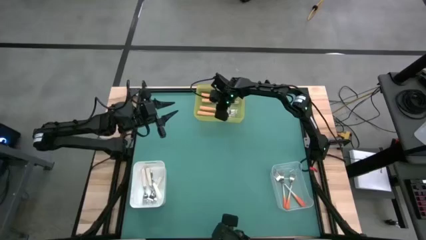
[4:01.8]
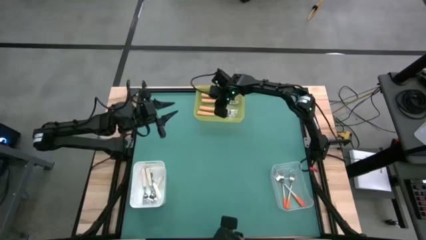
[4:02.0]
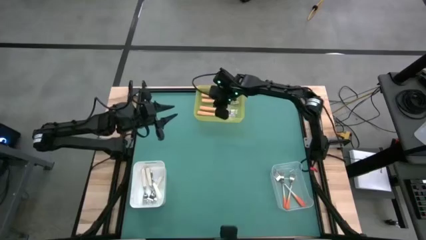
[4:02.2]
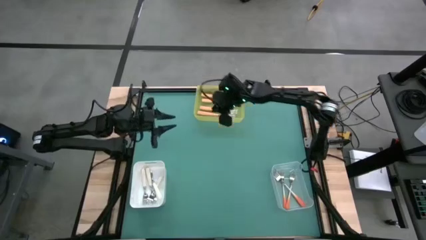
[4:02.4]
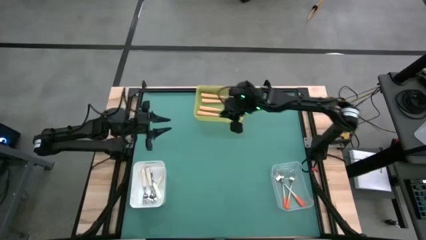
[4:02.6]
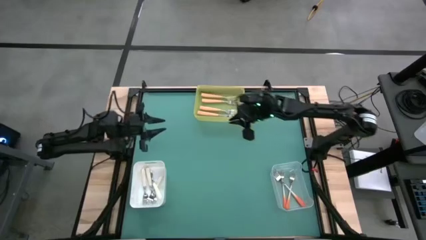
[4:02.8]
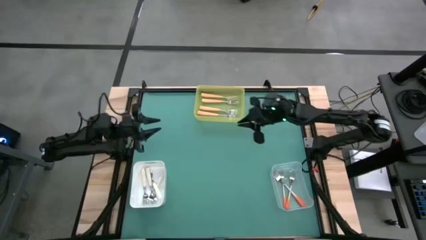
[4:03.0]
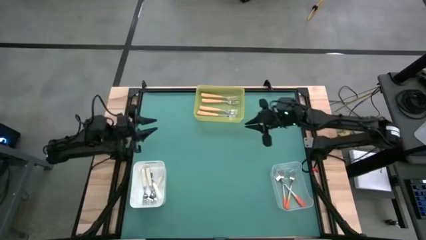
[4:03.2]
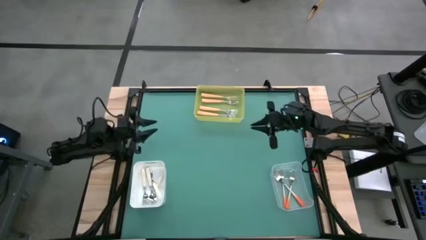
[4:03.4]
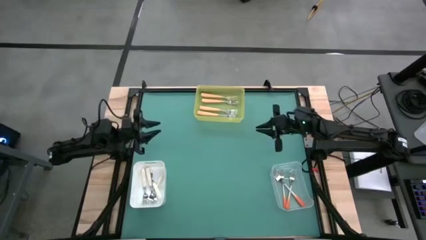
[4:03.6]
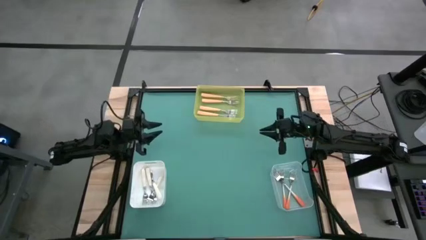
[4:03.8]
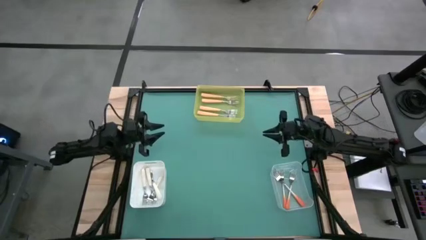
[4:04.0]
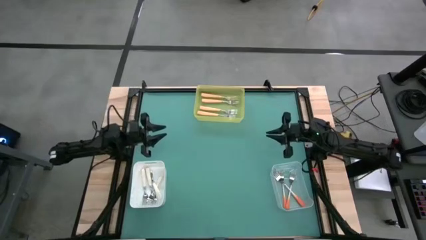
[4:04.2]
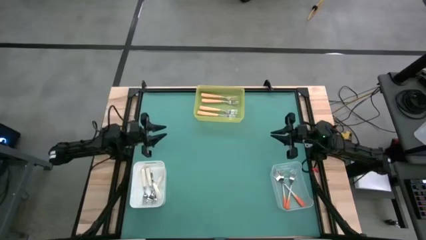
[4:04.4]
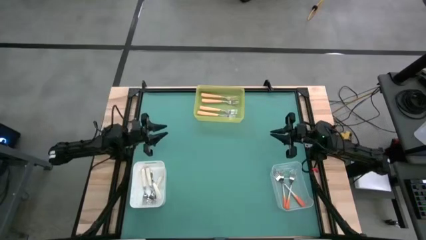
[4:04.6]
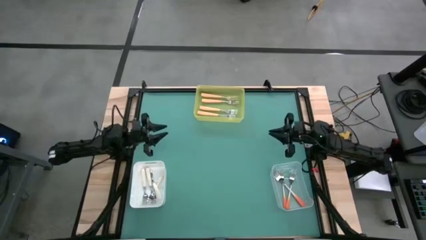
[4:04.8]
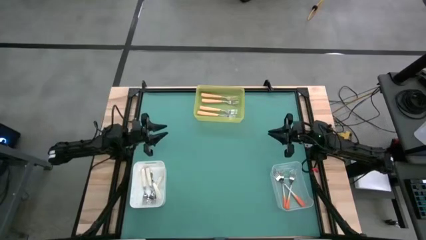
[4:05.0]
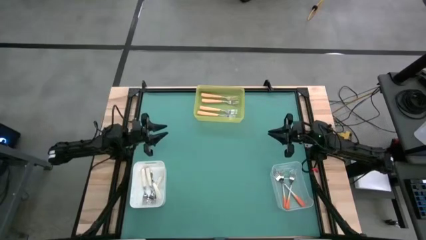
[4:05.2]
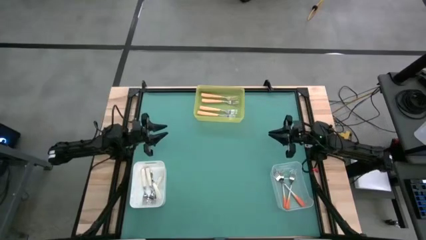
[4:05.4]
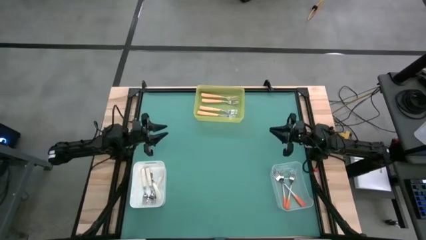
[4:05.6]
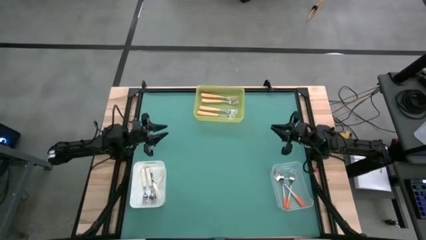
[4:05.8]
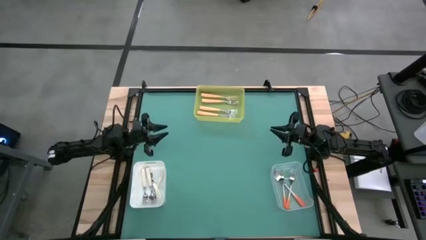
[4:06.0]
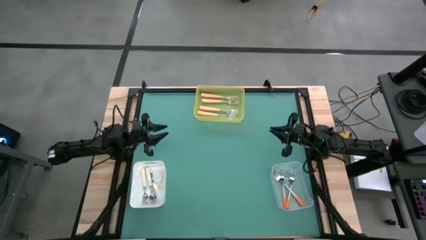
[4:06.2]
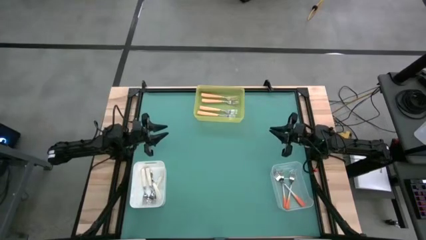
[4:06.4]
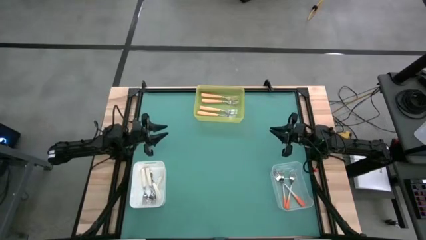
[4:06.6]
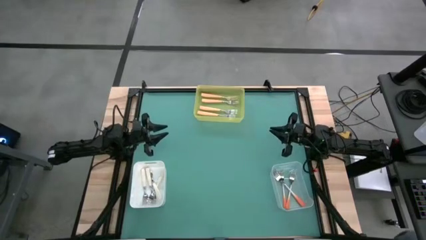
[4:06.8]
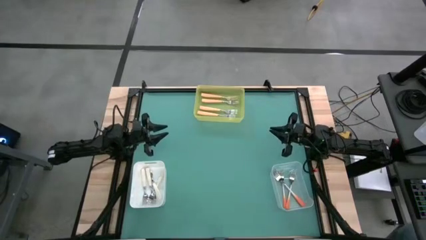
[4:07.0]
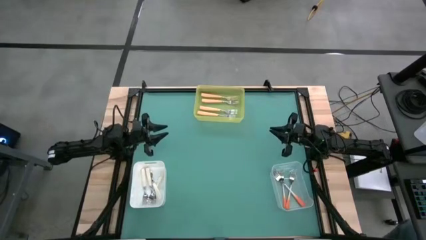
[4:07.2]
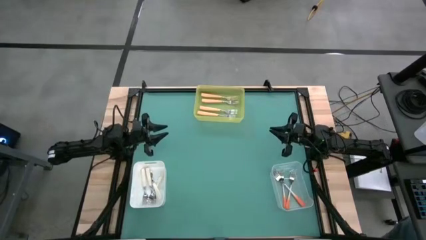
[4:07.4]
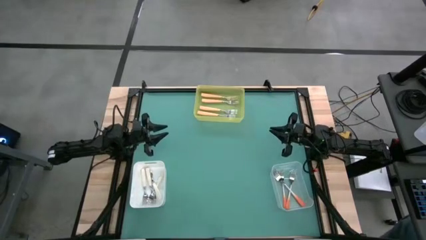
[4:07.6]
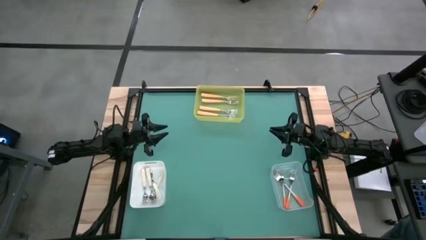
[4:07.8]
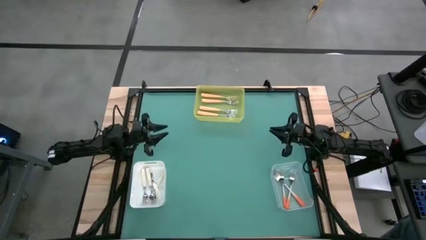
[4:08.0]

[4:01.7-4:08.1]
Task: Sort silverware by color (type)
Return to home position

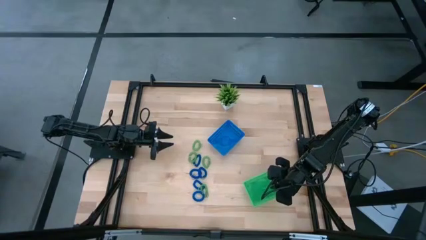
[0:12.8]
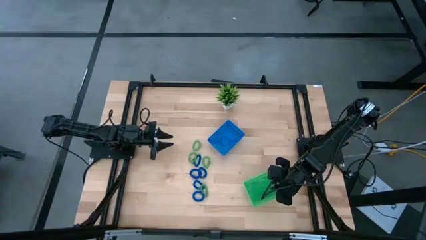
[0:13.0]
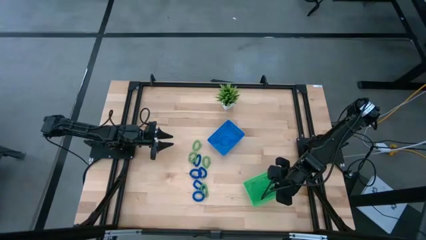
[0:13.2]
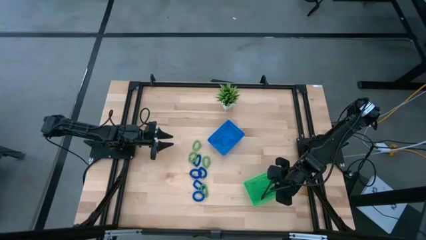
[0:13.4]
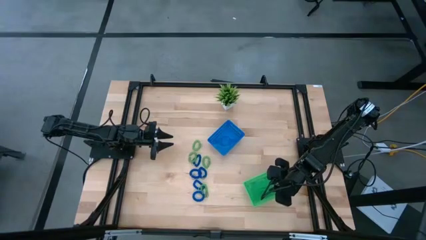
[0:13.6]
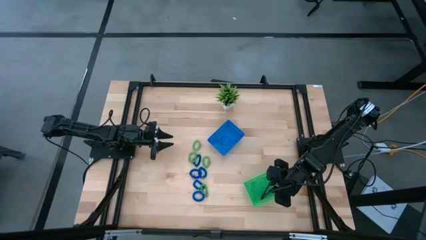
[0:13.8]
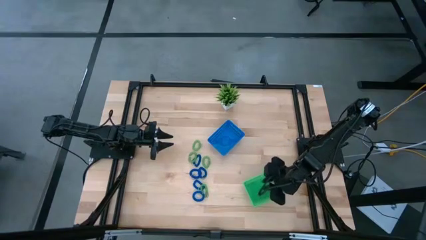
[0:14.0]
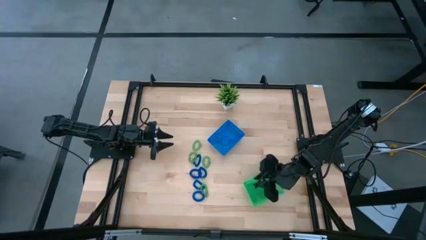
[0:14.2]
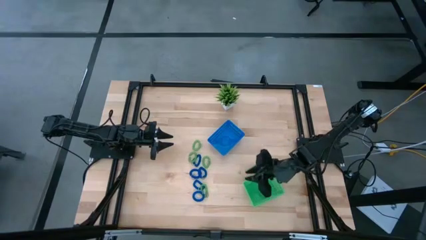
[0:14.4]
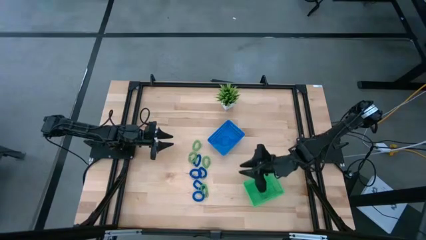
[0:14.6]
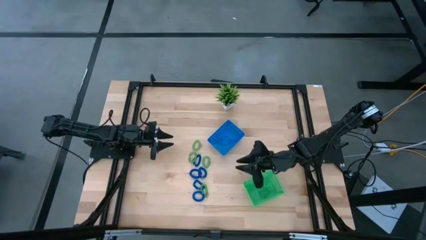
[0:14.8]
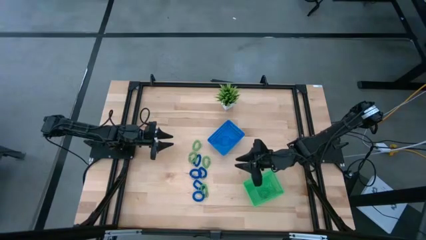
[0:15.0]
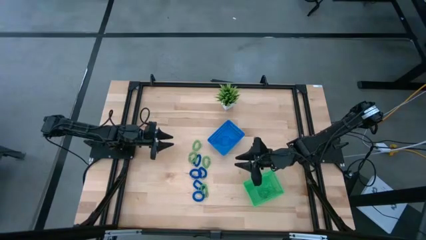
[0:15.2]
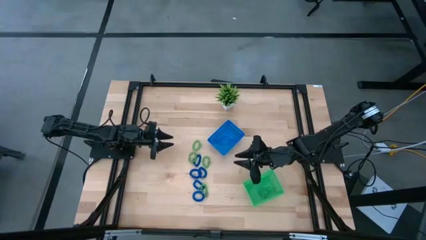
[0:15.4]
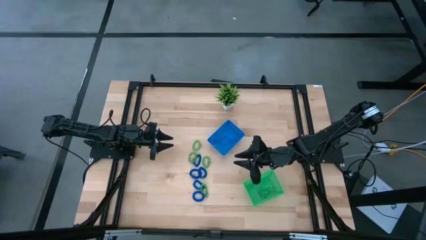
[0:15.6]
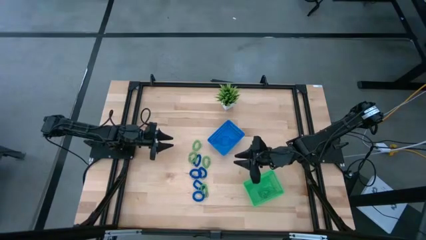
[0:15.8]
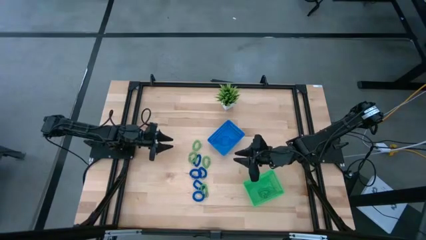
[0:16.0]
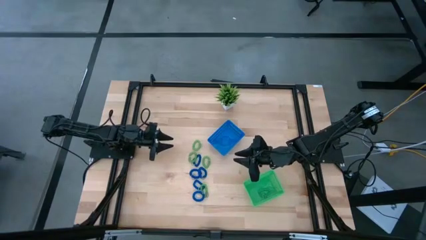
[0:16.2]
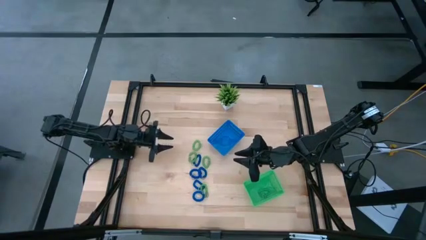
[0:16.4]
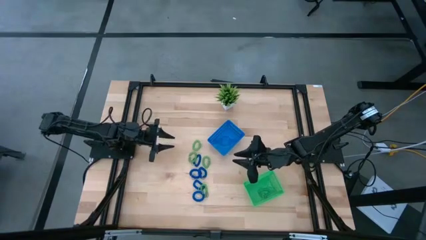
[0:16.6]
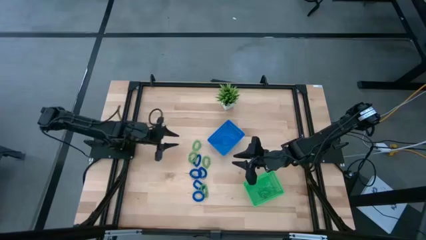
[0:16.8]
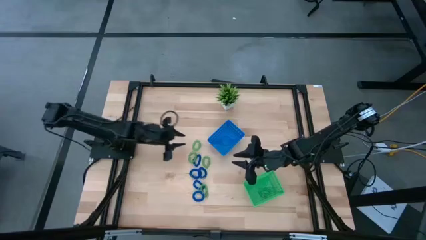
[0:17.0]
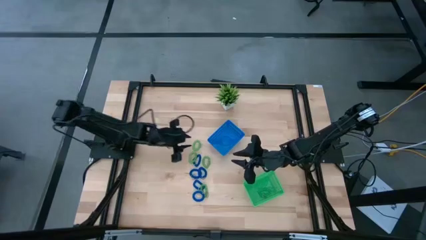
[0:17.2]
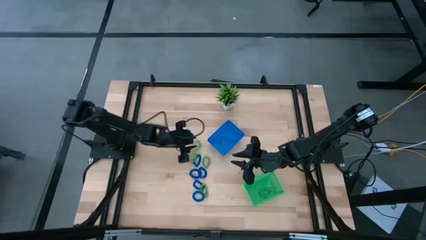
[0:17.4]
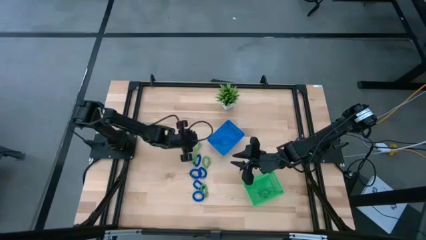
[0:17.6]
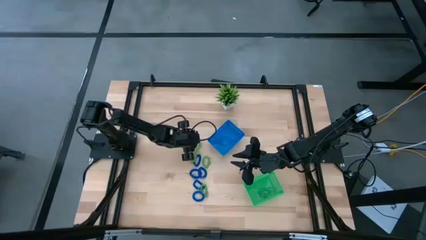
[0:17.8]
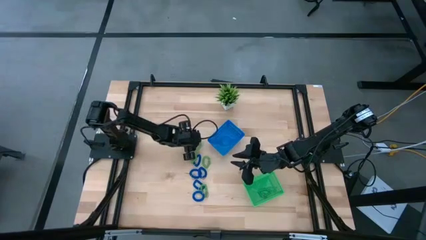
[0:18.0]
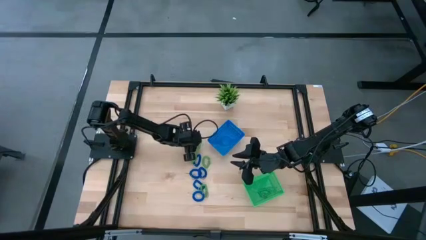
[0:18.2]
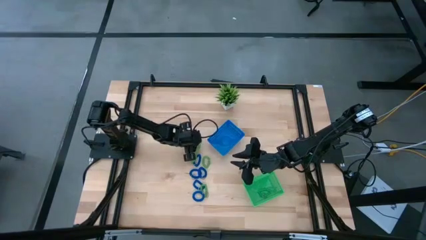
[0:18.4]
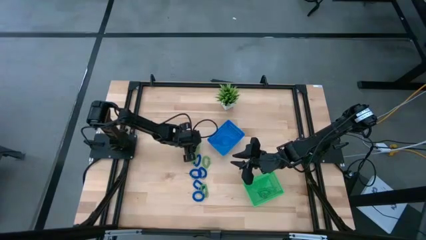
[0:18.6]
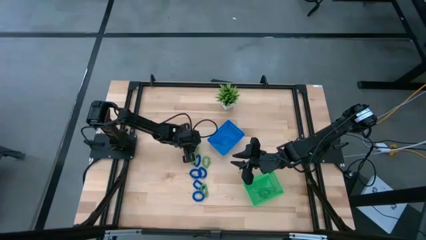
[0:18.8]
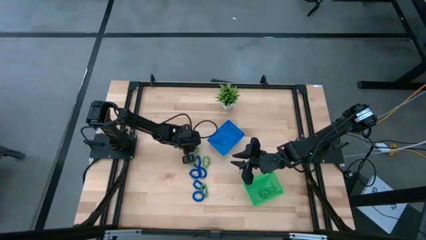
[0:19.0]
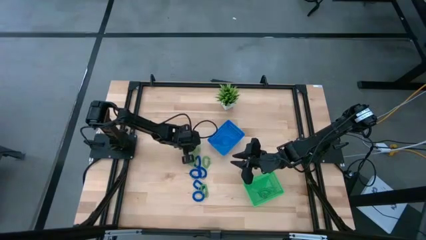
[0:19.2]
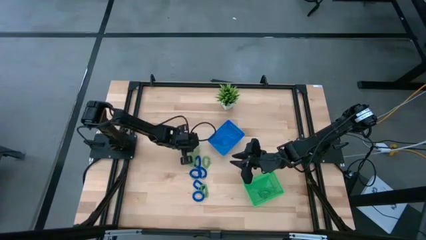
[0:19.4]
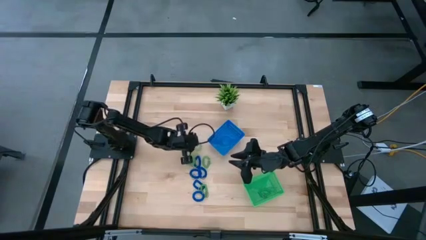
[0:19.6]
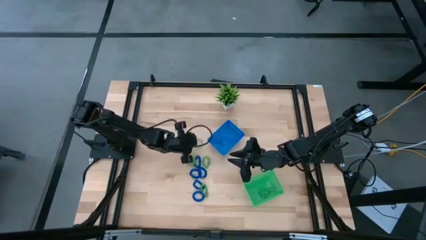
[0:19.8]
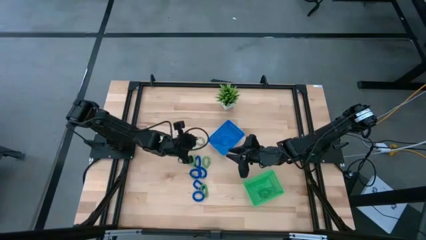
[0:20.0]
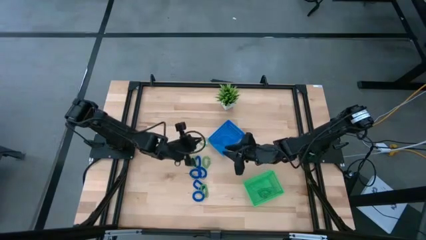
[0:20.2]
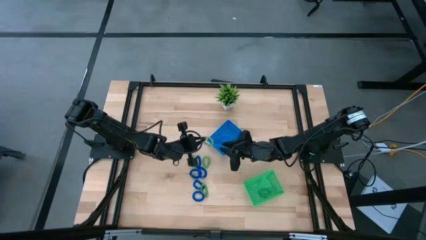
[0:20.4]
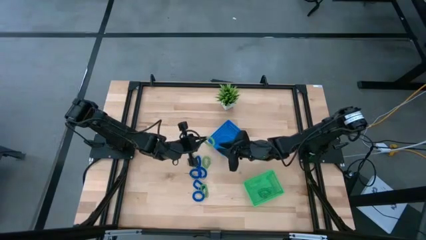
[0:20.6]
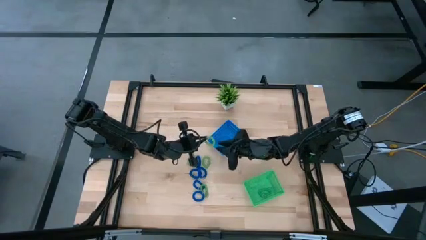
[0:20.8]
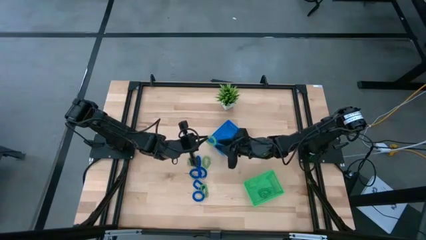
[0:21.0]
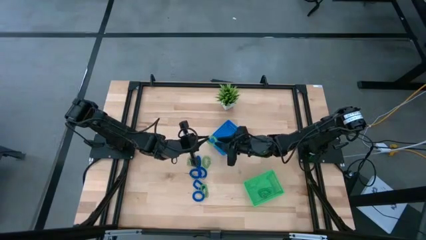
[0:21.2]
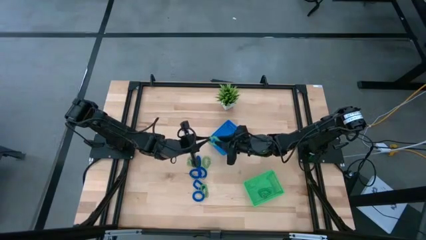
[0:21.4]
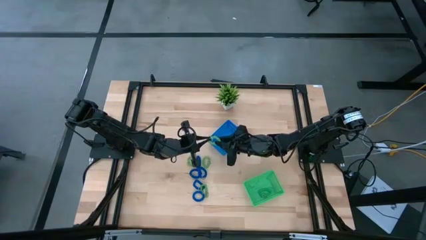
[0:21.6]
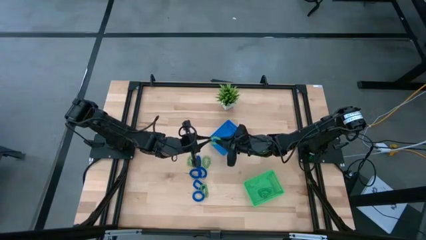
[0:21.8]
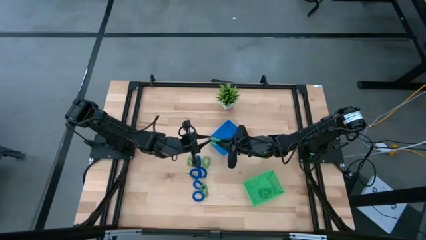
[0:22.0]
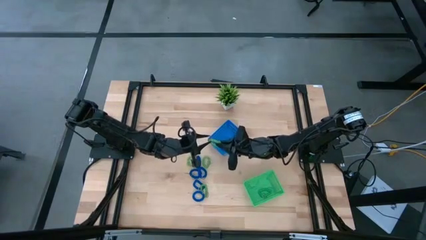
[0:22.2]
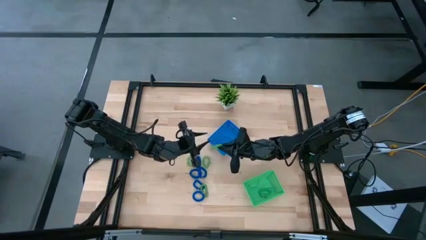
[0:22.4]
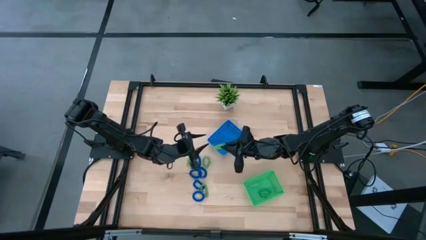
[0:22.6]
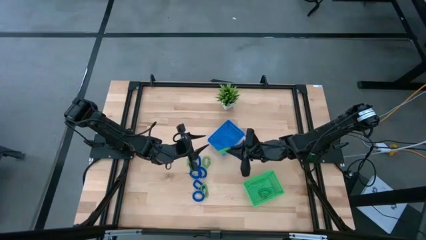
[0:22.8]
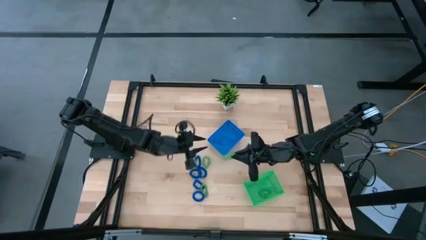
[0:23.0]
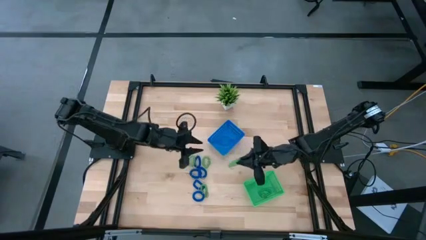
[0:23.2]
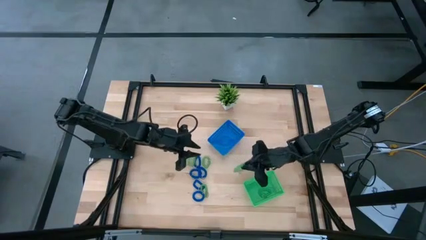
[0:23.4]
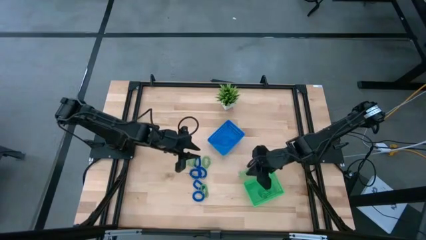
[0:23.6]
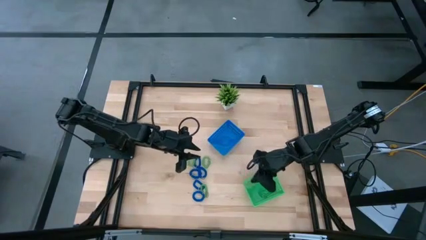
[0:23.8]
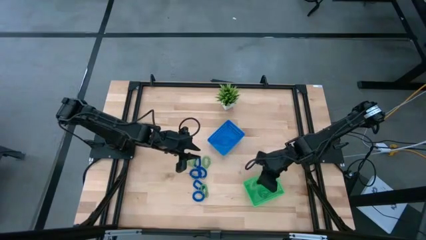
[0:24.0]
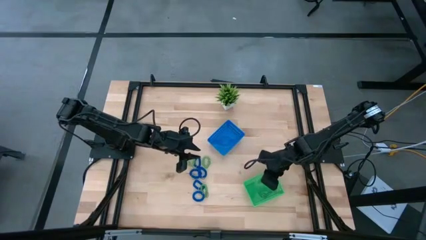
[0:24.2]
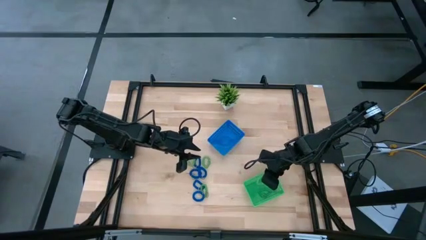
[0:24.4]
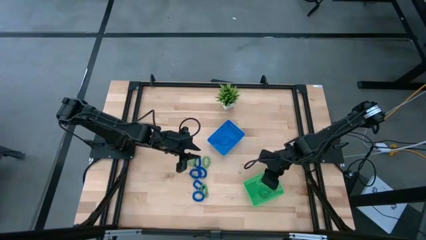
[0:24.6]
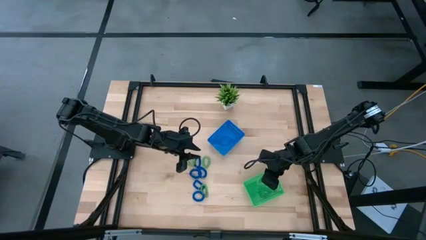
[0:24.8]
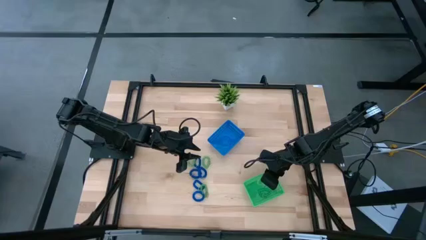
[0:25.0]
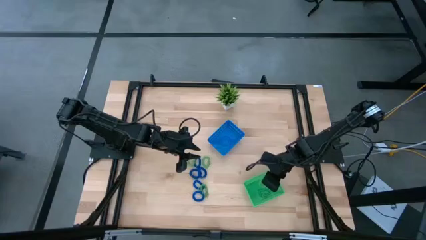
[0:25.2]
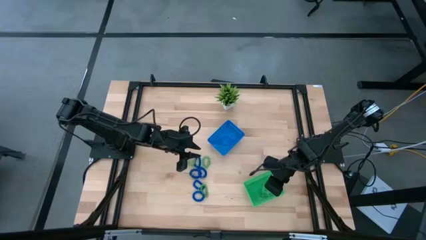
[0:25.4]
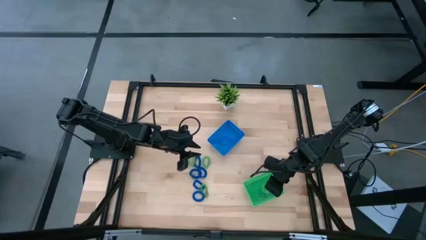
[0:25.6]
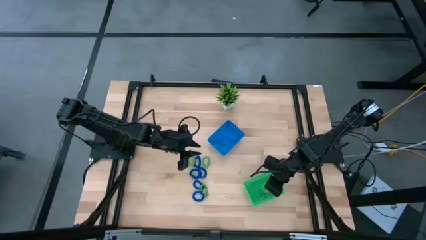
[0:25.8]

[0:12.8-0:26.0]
Task: Sort spring keychains
Put the green spring keychain into the green bin
